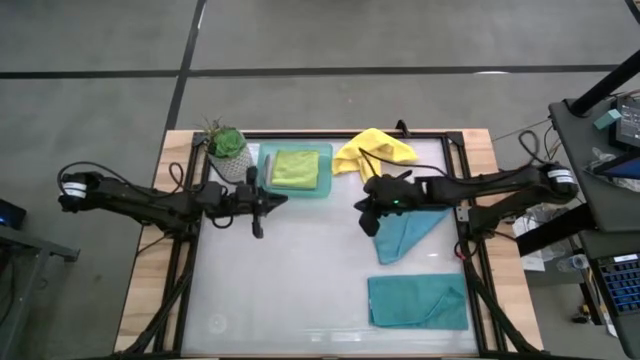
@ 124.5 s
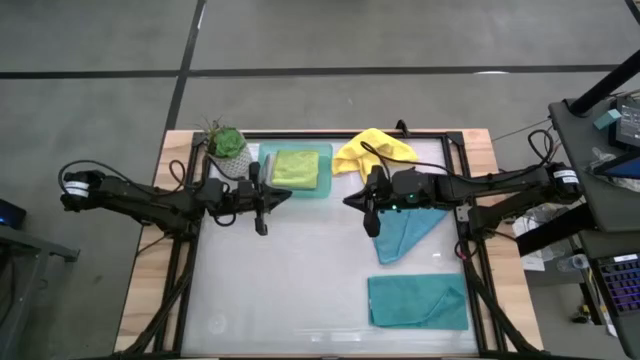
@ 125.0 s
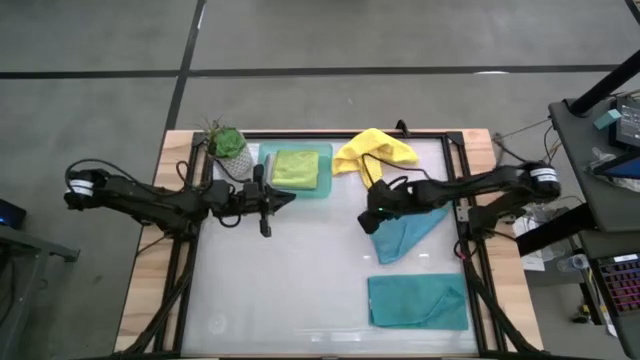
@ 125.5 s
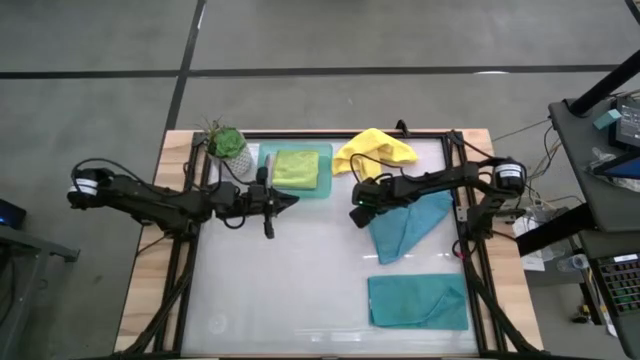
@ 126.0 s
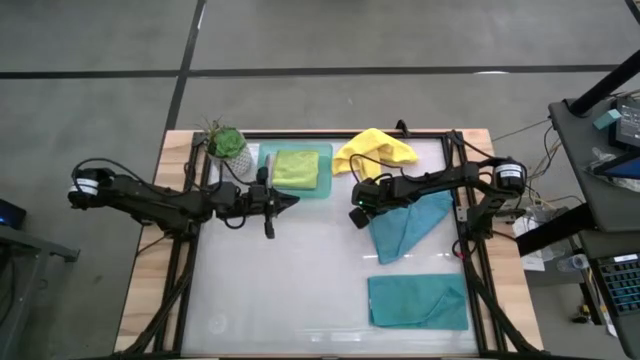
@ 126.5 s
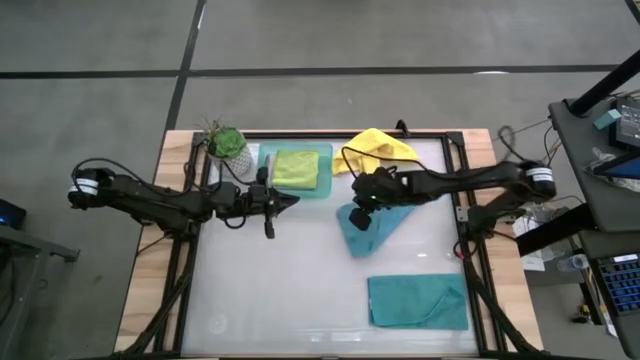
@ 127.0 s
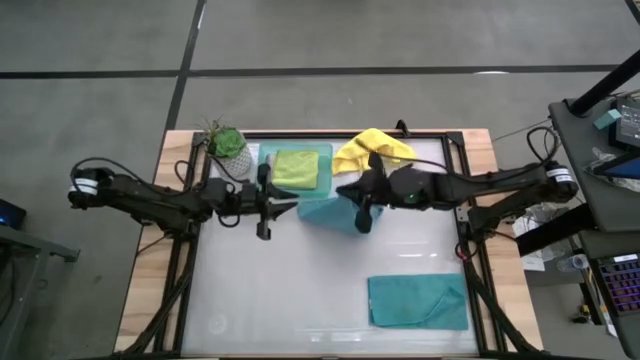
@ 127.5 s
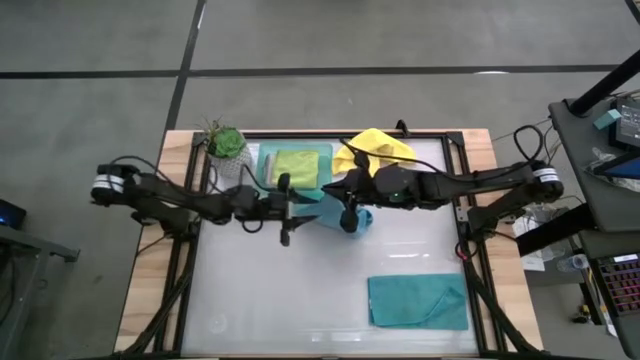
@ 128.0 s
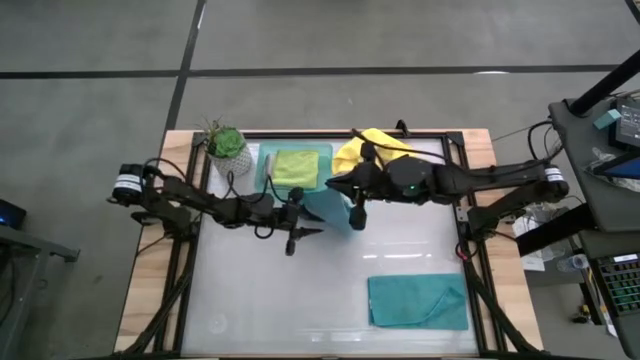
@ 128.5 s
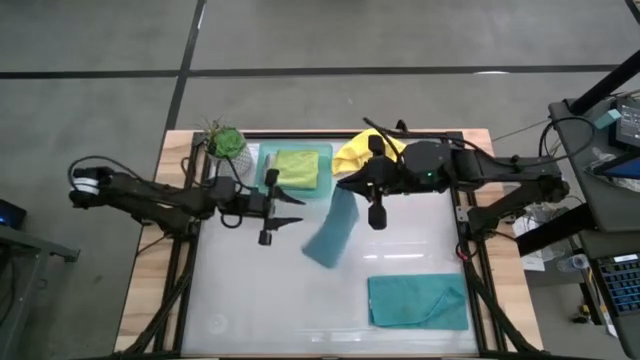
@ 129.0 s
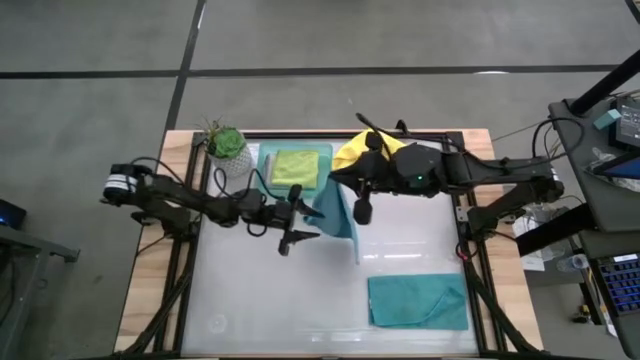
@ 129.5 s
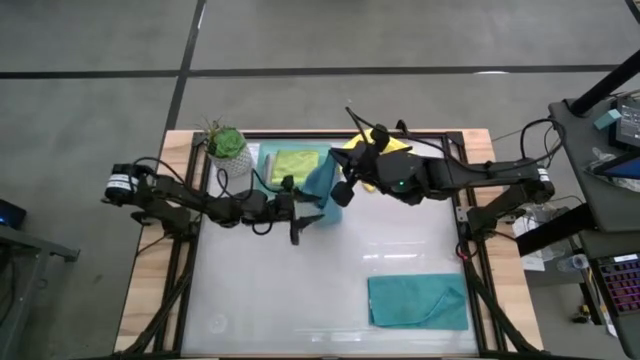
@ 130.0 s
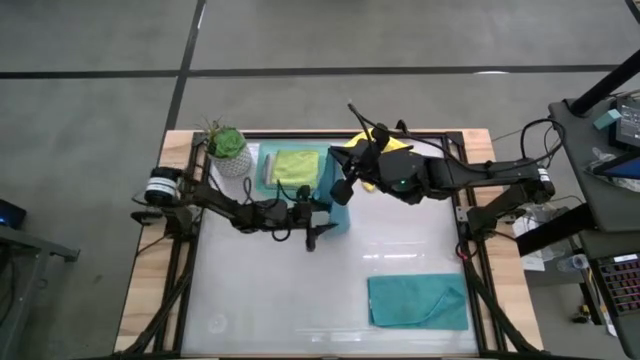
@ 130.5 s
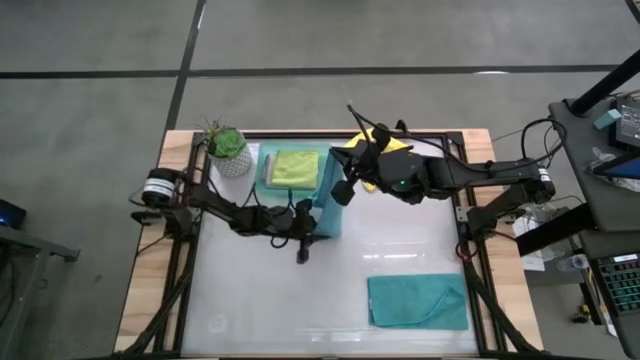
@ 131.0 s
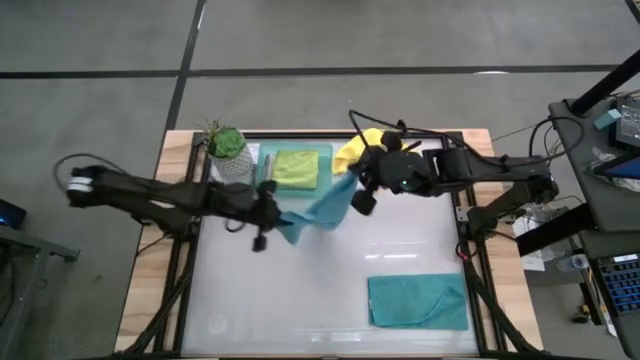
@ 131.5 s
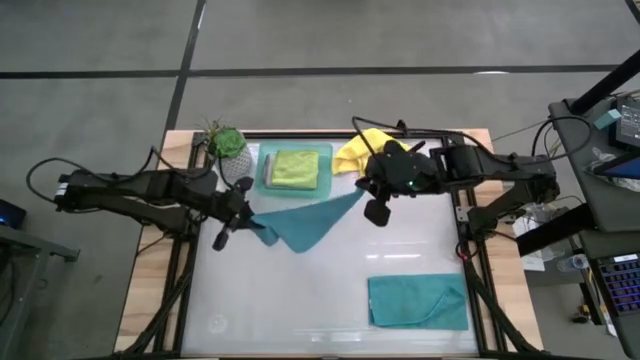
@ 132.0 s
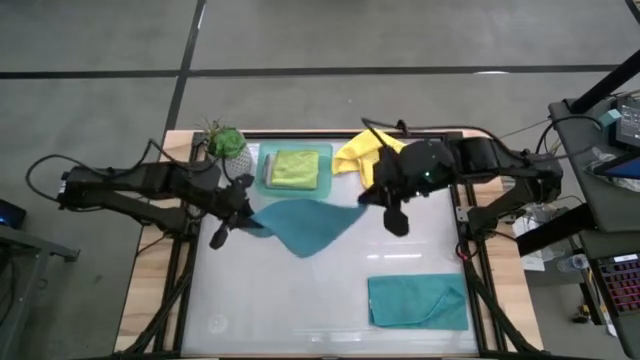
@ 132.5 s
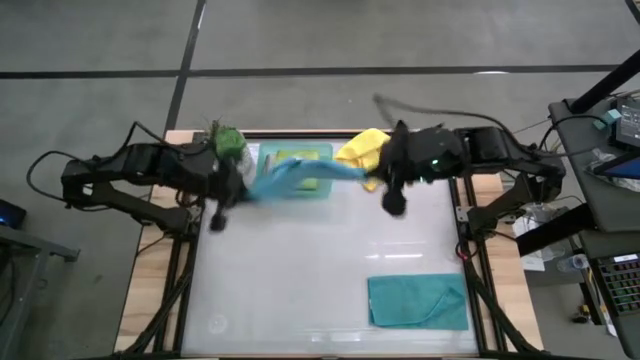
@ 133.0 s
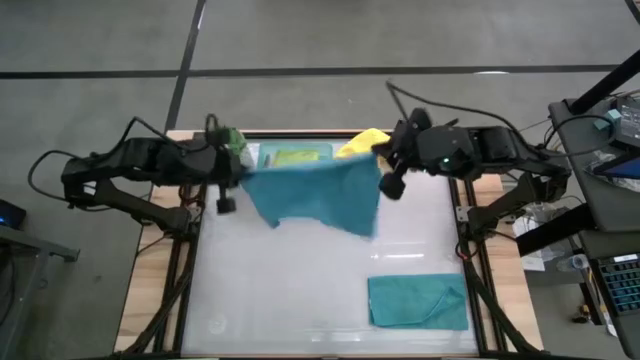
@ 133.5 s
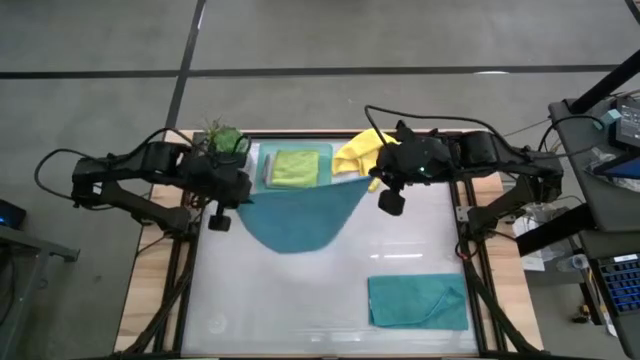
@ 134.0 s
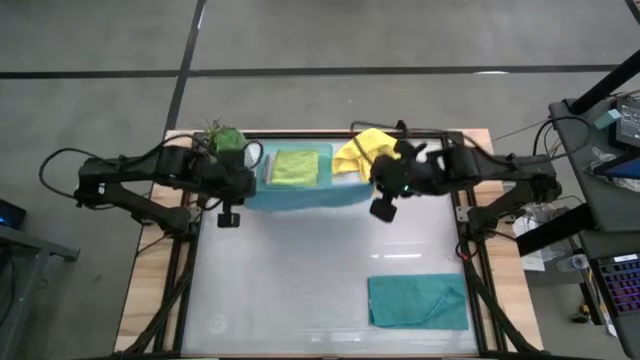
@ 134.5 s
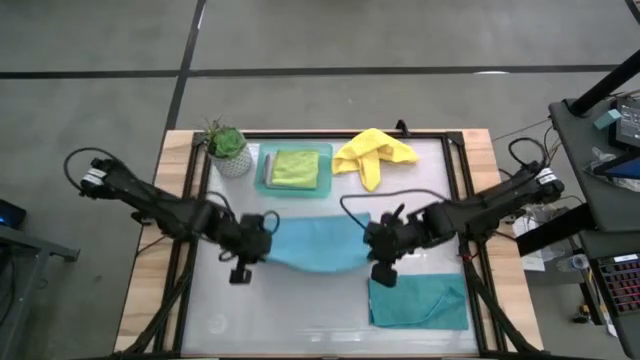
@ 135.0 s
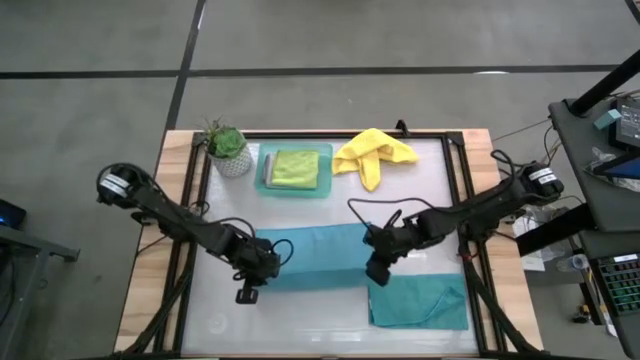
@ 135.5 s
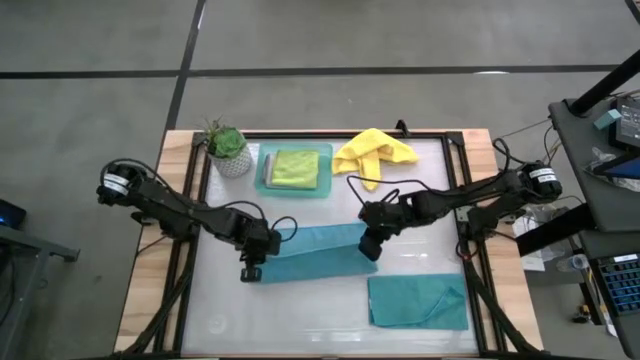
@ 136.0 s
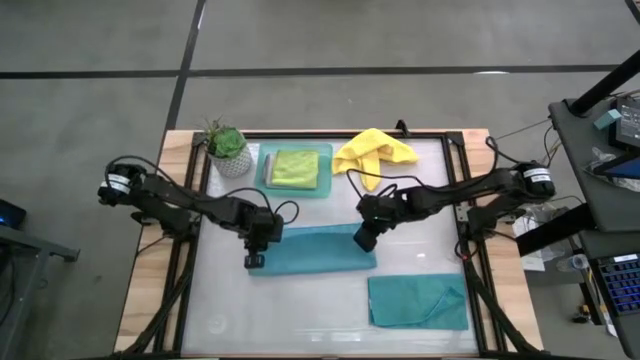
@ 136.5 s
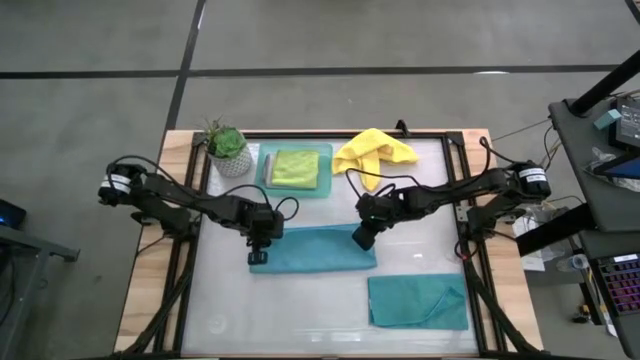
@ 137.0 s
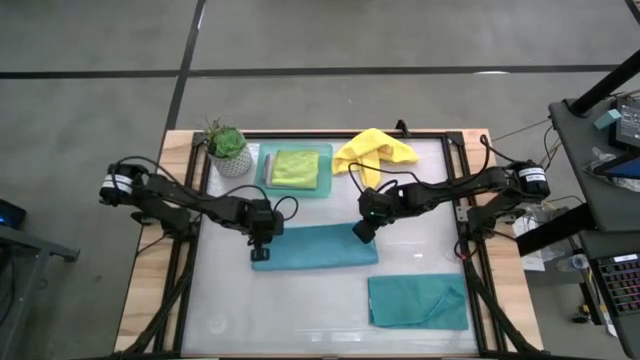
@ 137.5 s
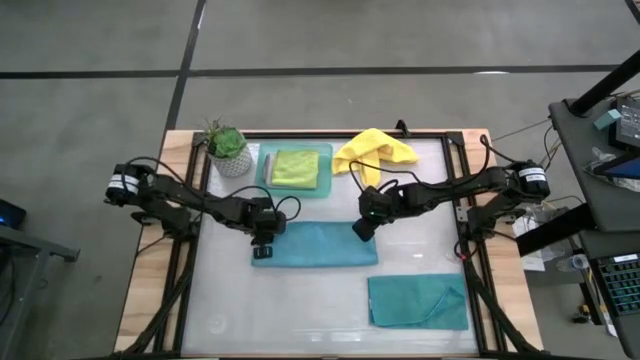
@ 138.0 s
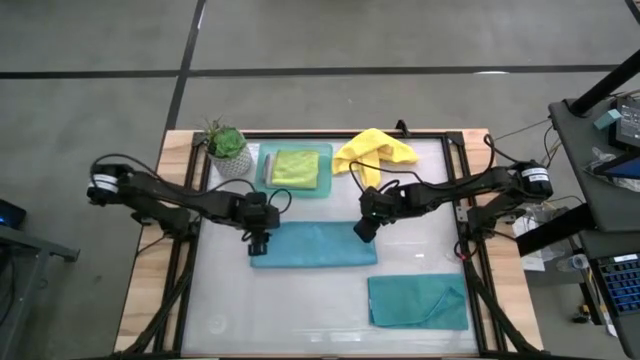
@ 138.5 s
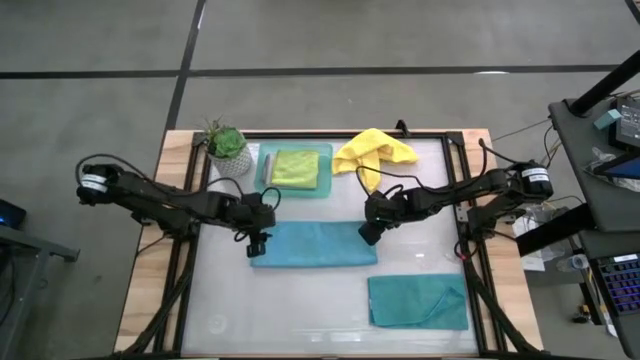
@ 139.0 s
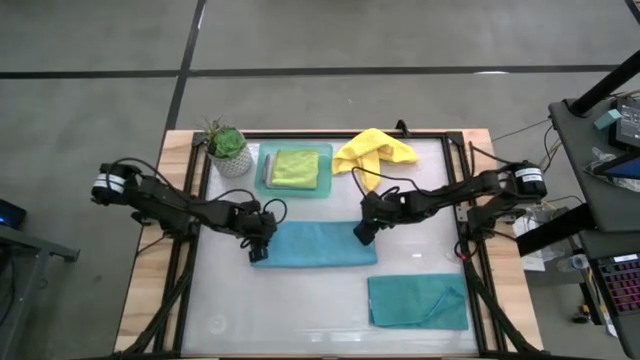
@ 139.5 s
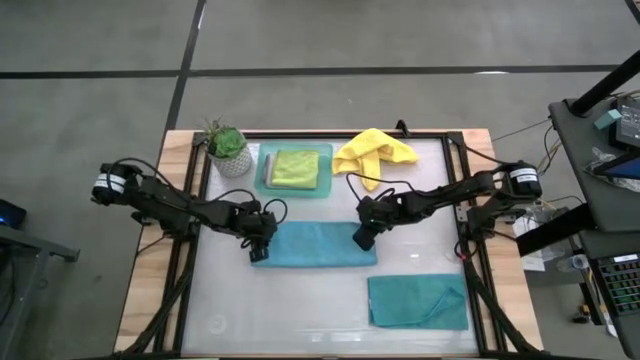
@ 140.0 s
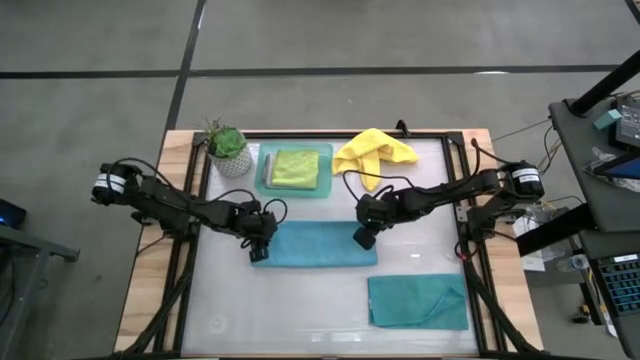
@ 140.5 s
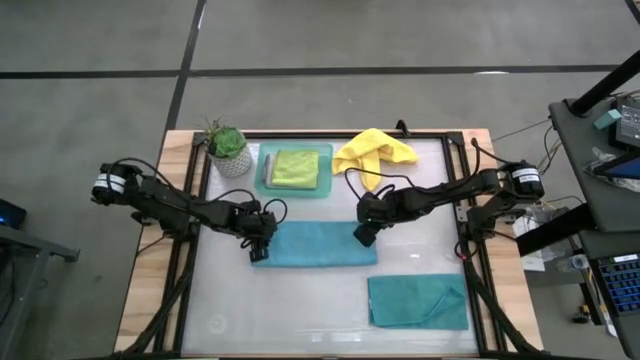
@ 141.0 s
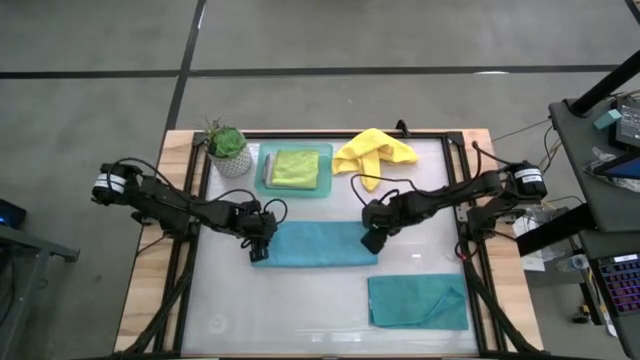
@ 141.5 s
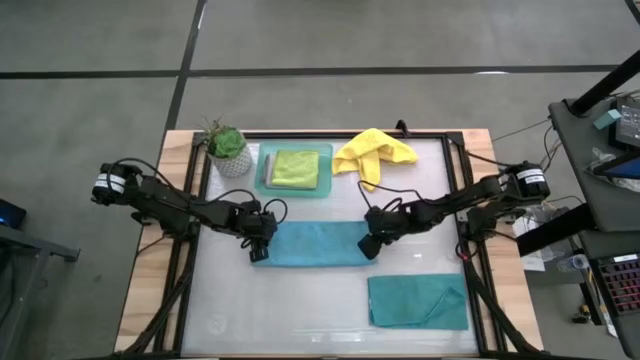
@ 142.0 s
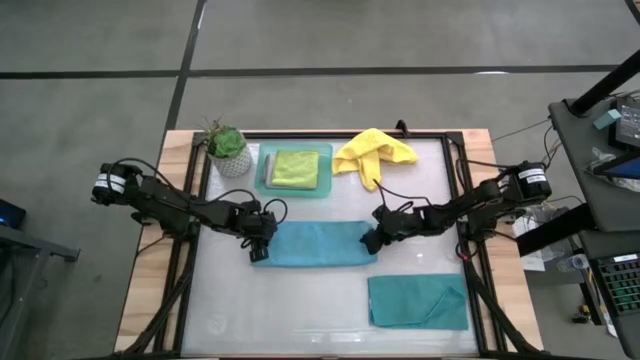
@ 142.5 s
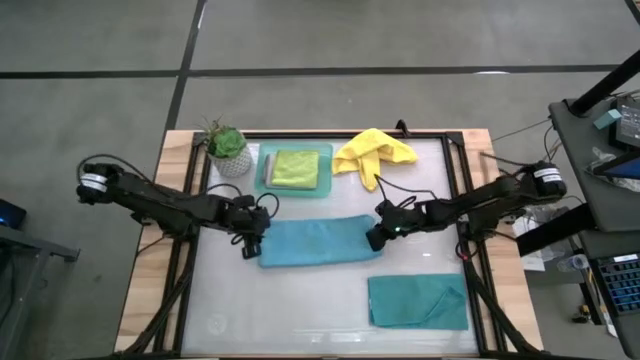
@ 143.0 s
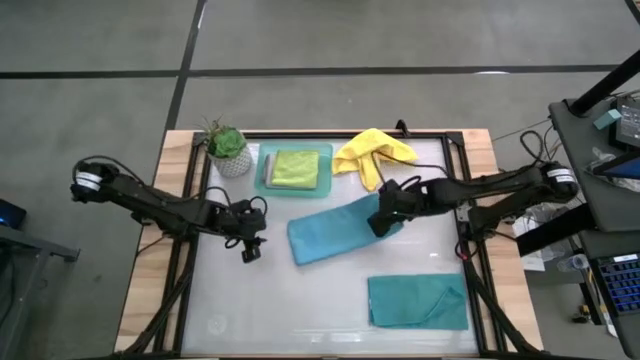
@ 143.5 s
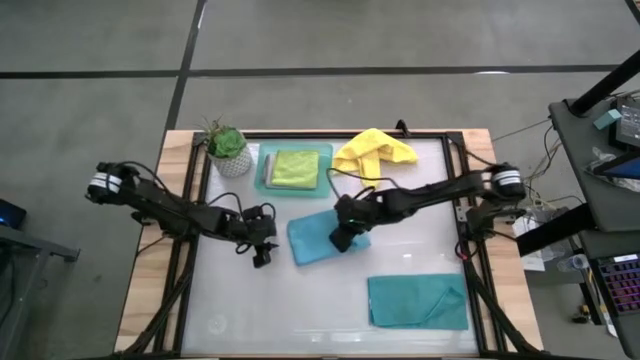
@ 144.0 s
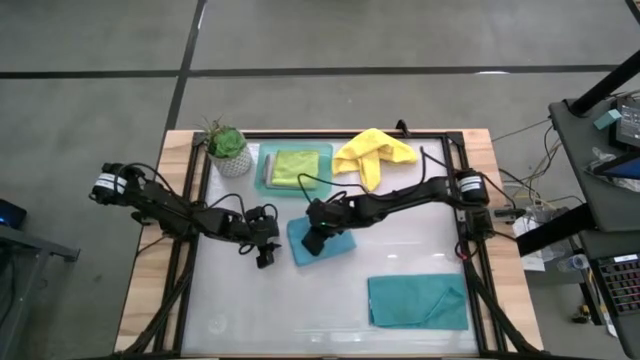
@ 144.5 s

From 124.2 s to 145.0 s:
Task: Fold microfiber towels
Fold the top blue microfiber towel

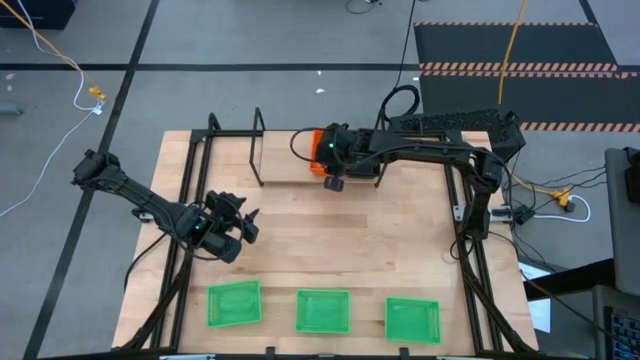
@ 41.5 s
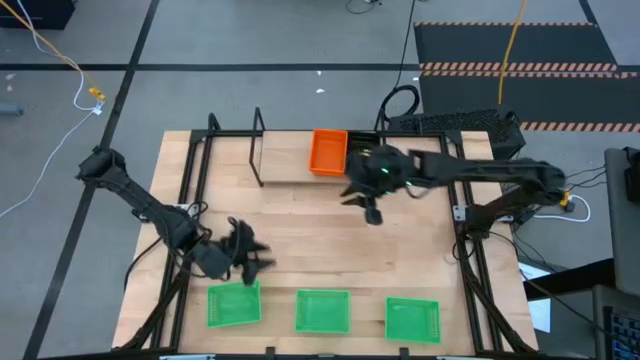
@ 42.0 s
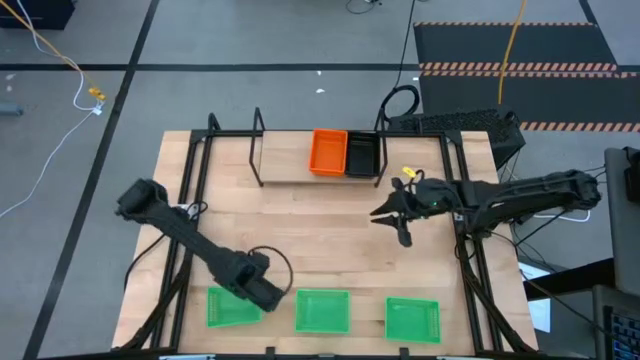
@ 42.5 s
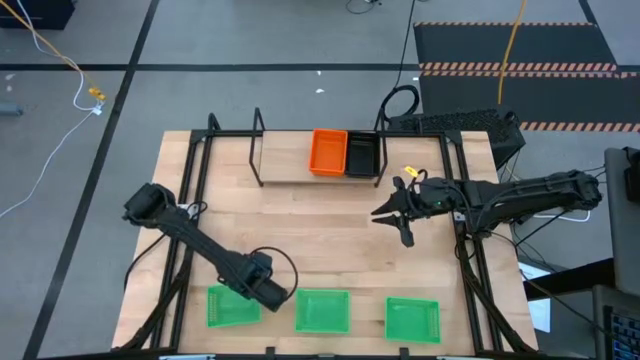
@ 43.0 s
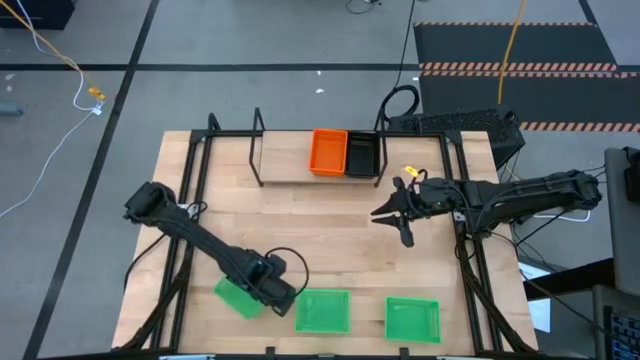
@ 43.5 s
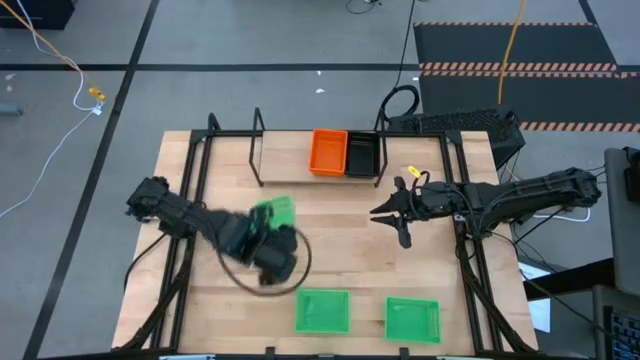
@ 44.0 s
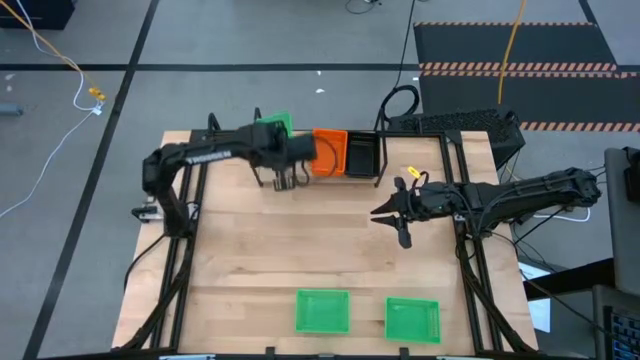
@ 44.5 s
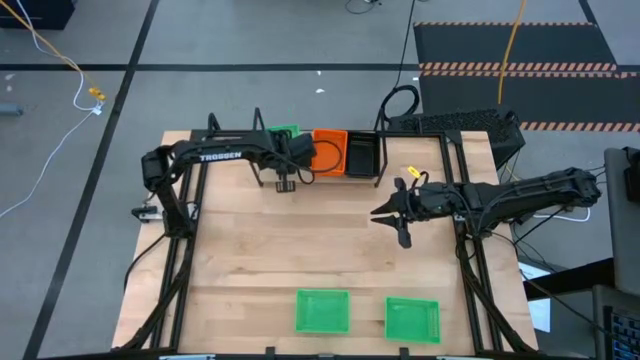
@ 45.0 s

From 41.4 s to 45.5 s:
Task: Stack baskets on shelf by color
Put the left green bin on the shelf
